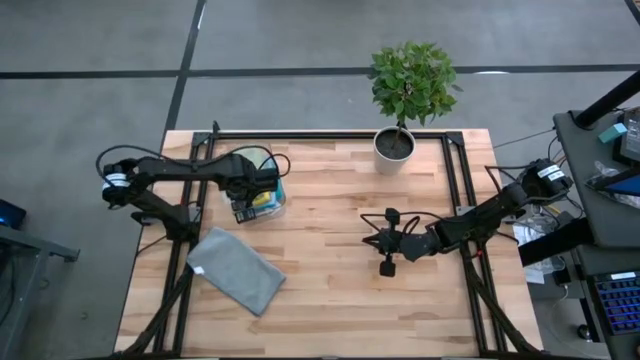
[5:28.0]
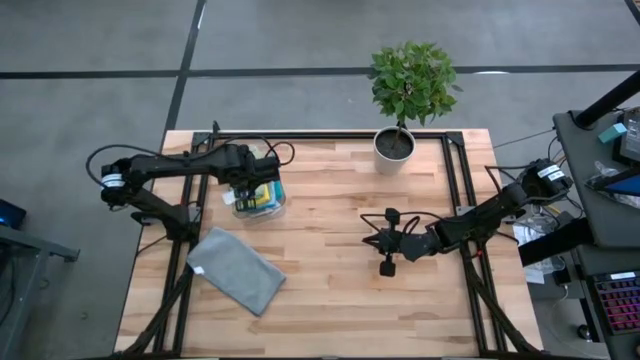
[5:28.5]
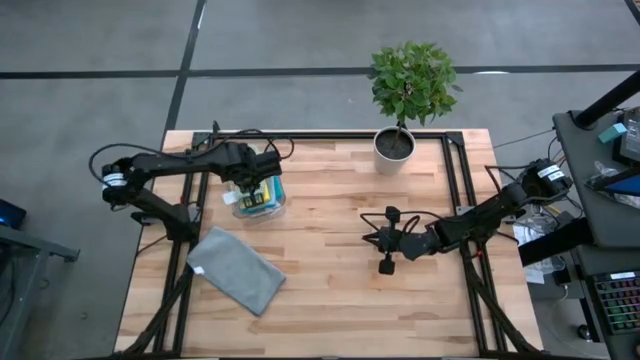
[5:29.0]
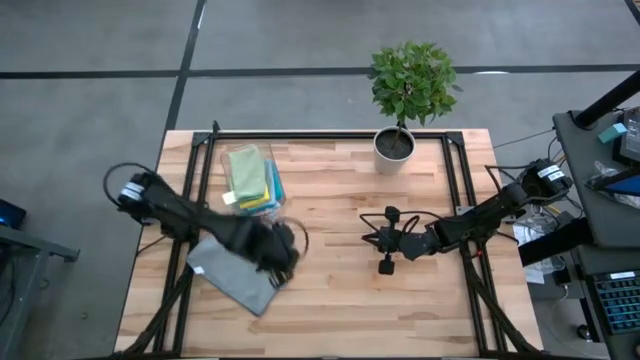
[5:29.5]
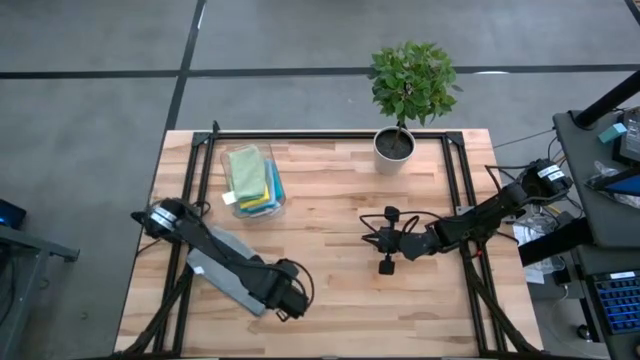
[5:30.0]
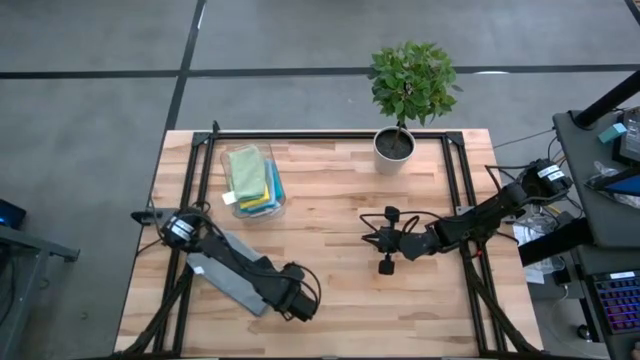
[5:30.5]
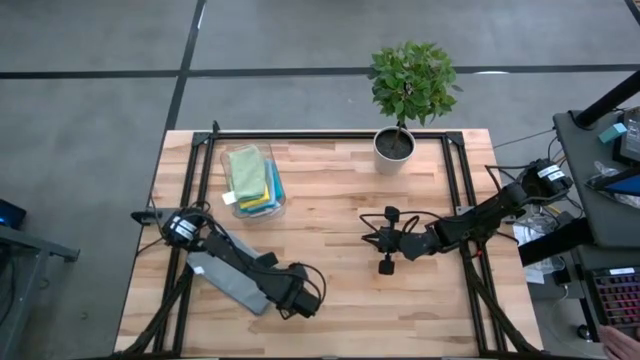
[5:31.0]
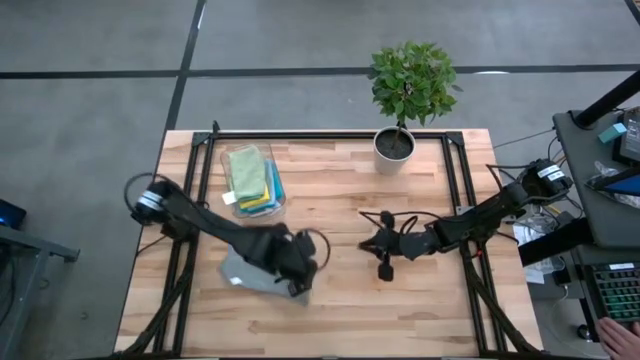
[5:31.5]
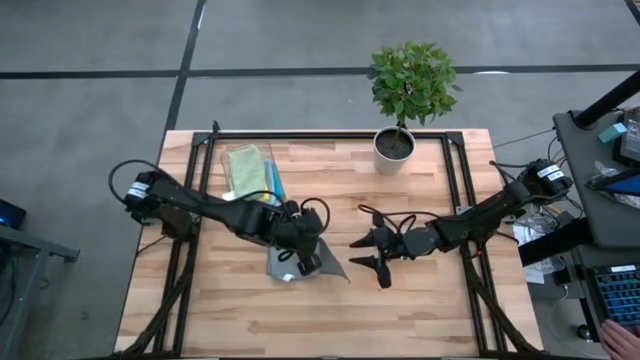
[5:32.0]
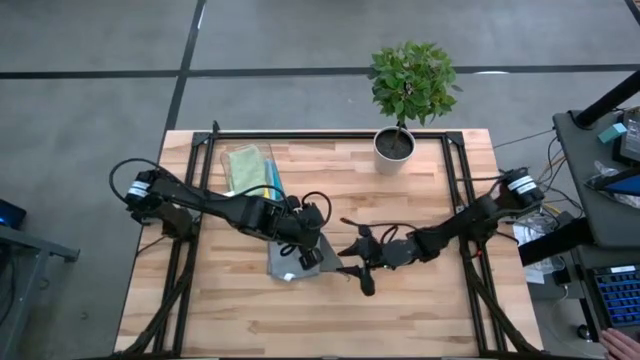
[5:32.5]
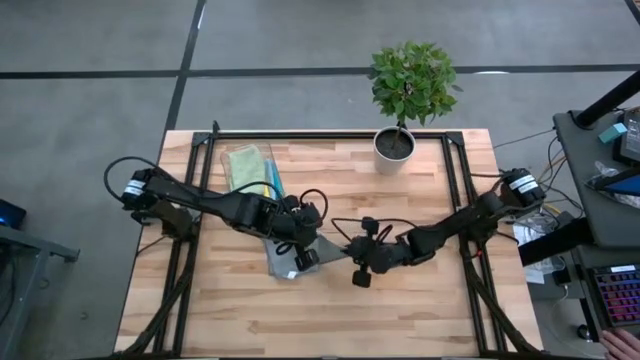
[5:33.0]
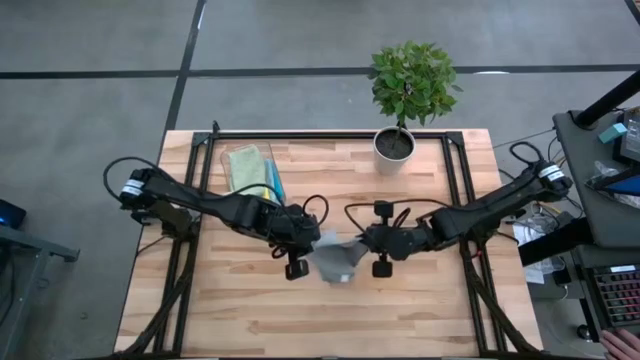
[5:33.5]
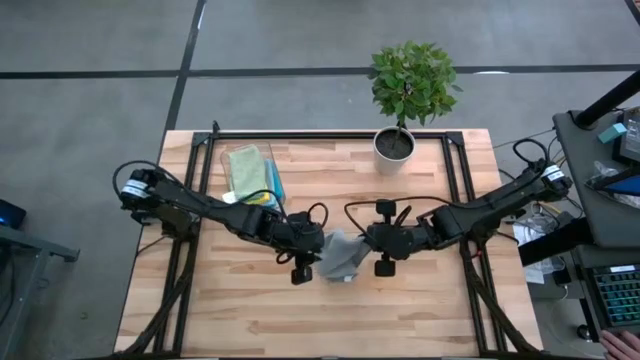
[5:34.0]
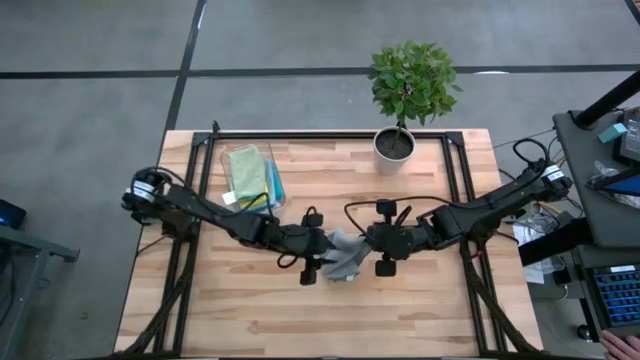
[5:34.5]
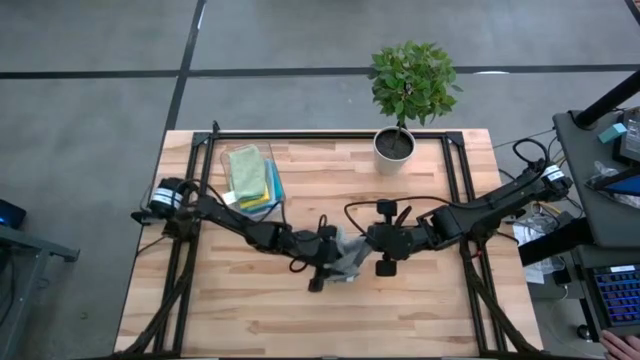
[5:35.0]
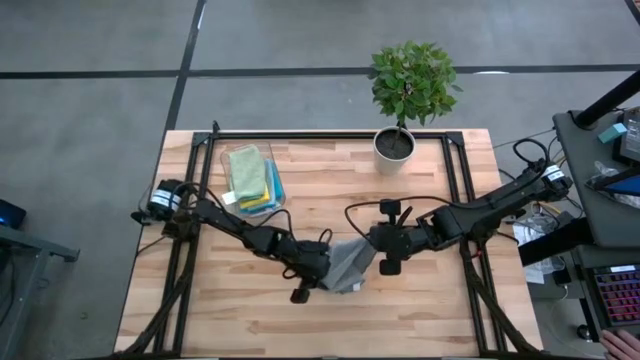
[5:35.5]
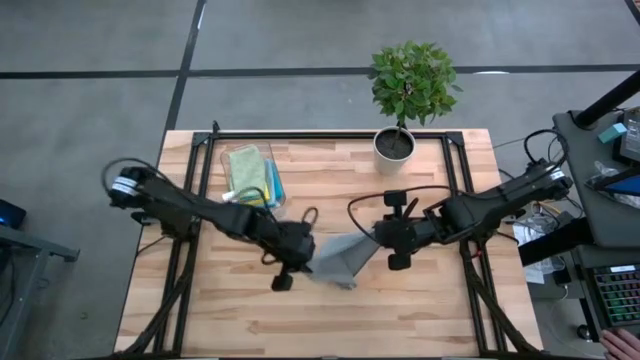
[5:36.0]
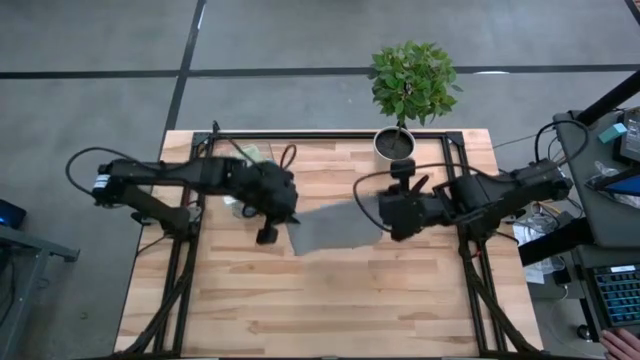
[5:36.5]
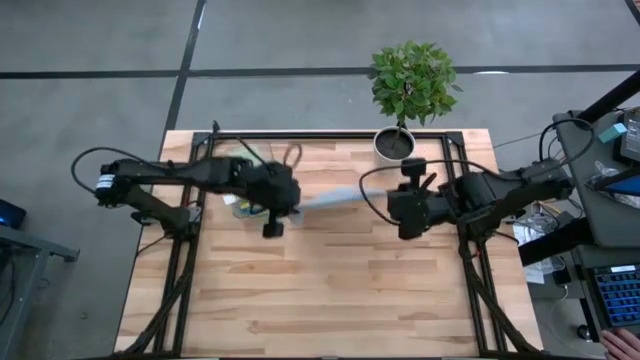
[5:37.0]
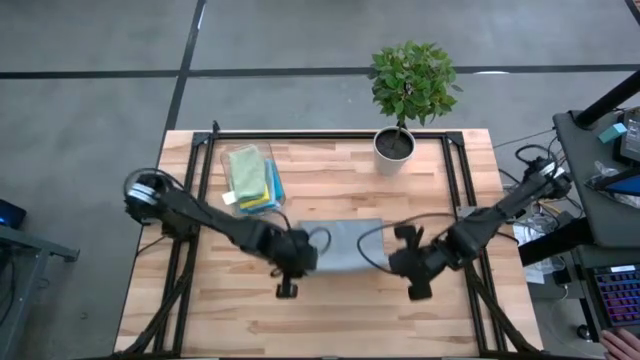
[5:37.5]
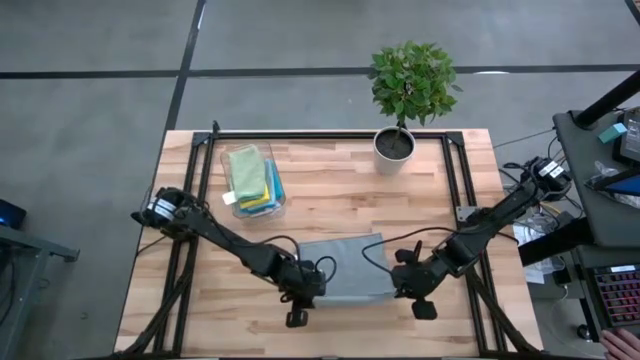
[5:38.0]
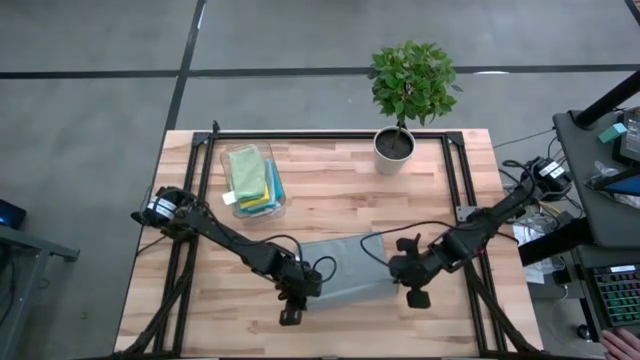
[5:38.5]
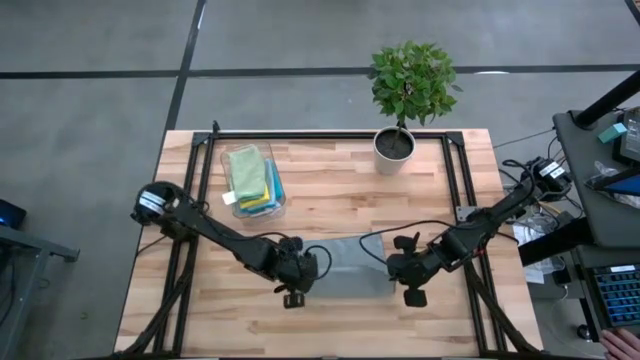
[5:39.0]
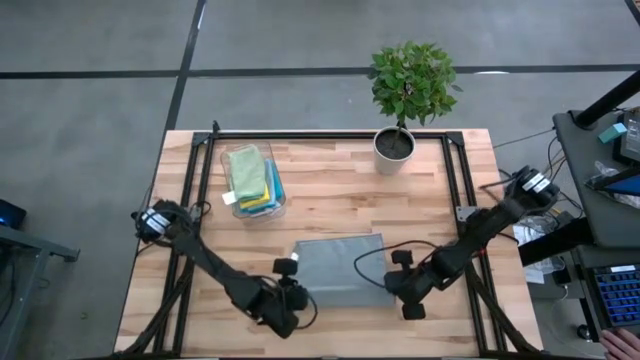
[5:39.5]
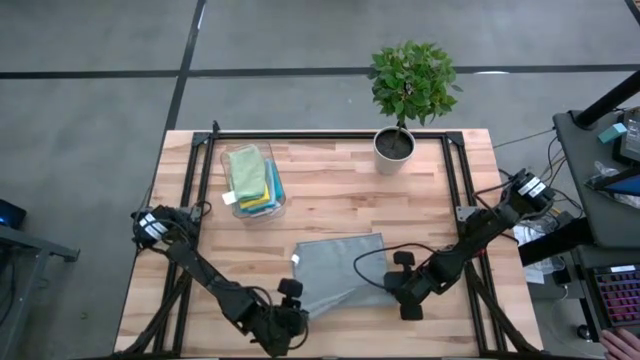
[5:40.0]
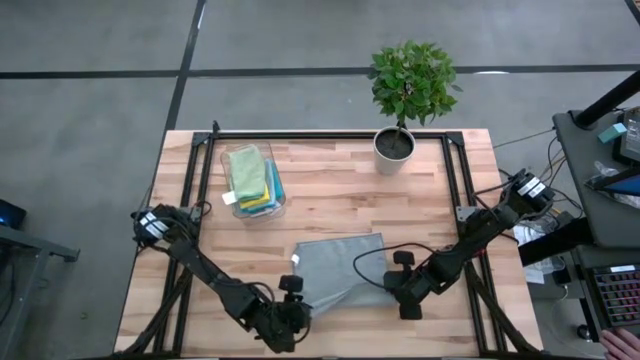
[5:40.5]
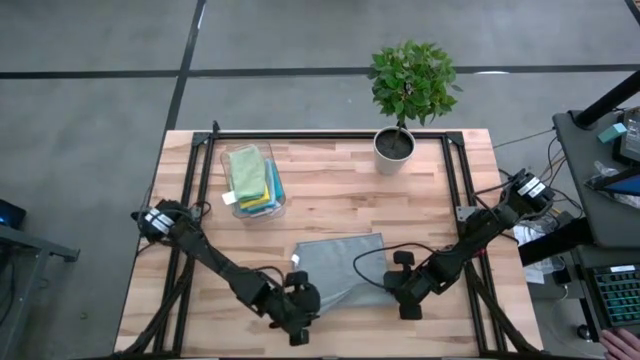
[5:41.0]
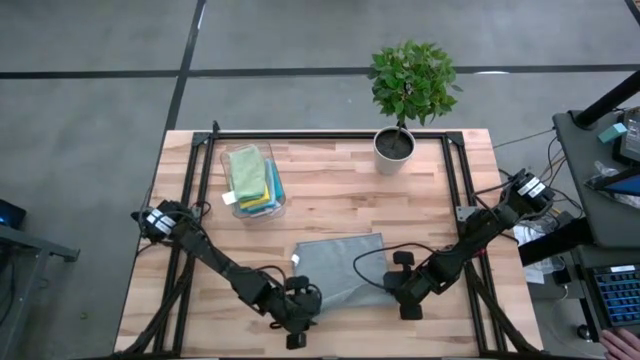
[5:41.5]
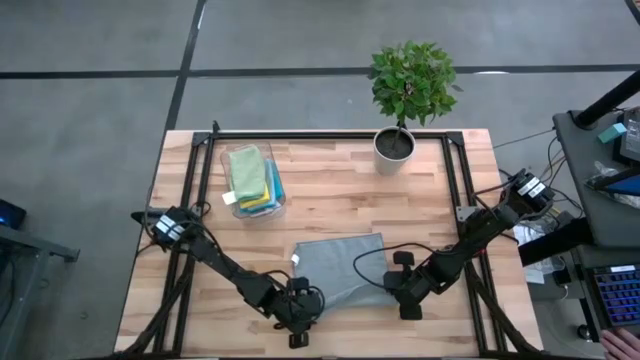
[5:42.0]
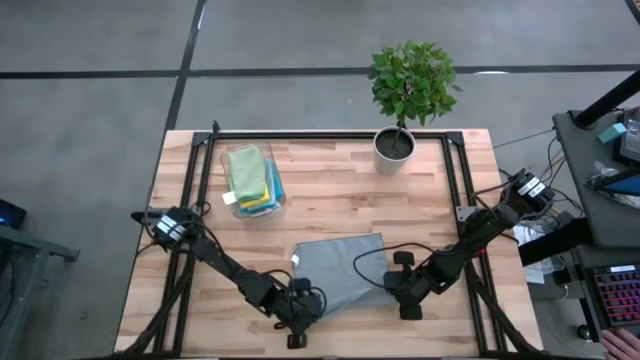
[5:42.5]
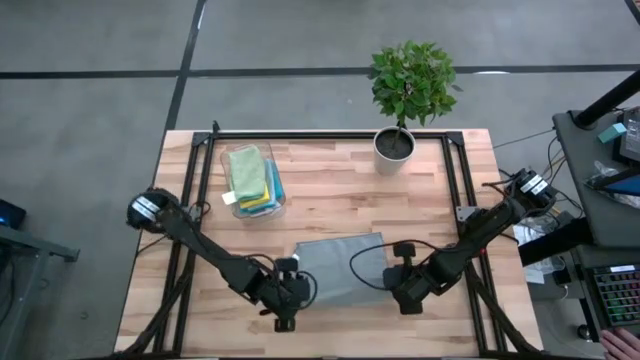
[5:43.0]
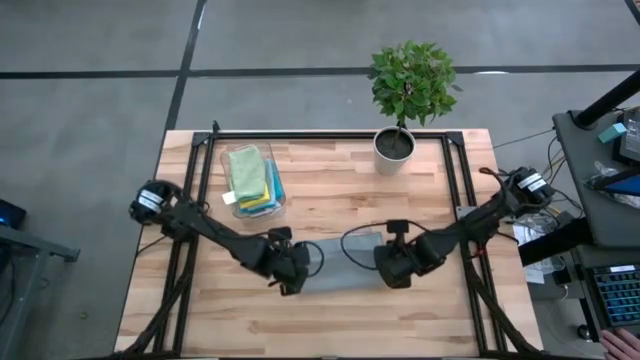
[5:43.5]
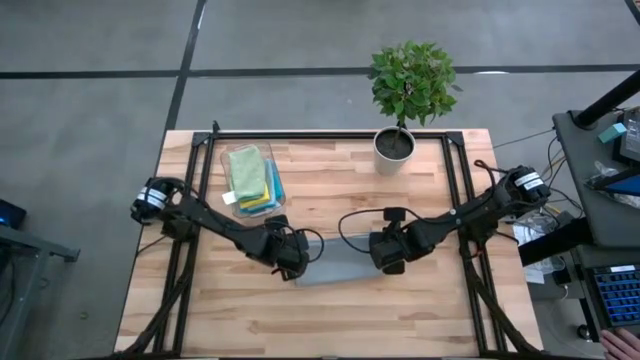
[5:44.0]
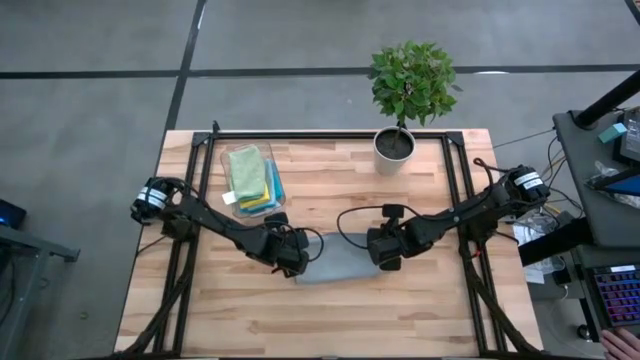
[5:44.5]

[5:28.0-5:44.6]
Task: Fold microfiber towels
Fold the gray microfiber cloth

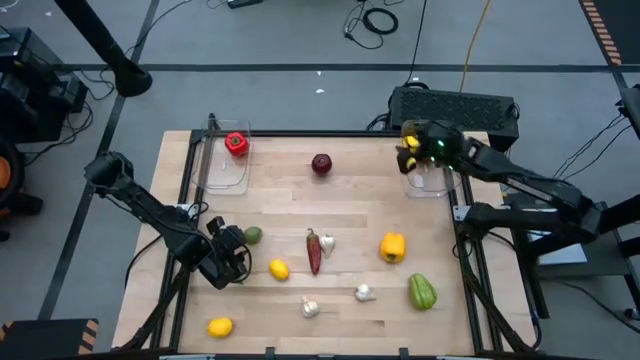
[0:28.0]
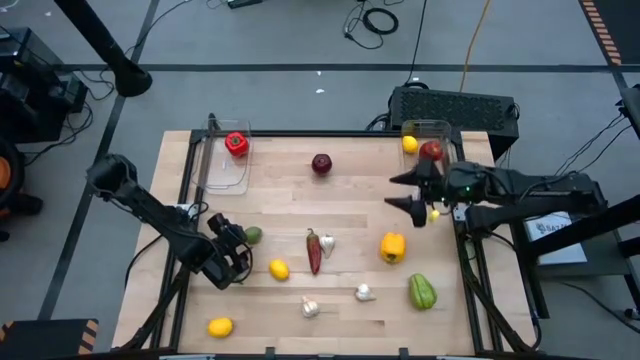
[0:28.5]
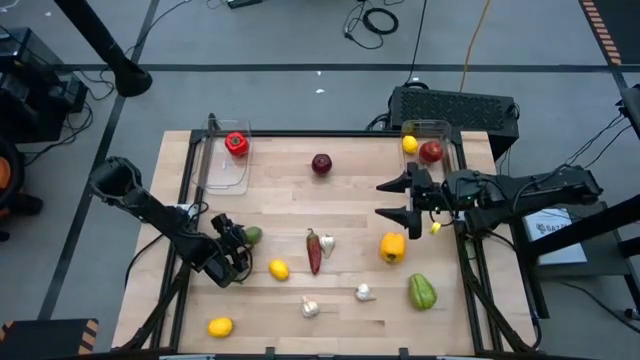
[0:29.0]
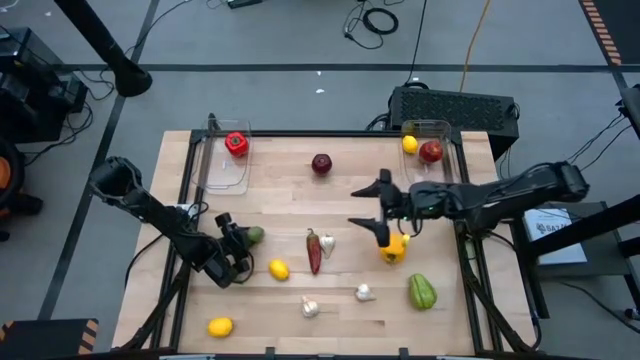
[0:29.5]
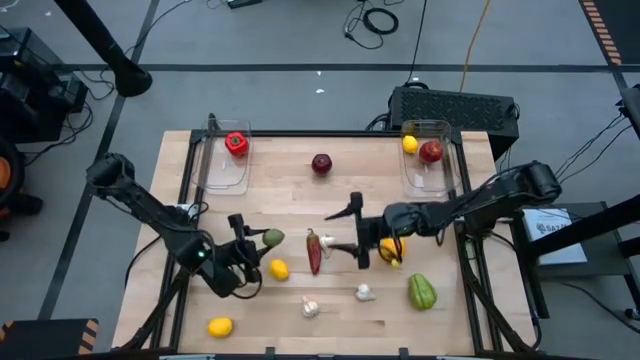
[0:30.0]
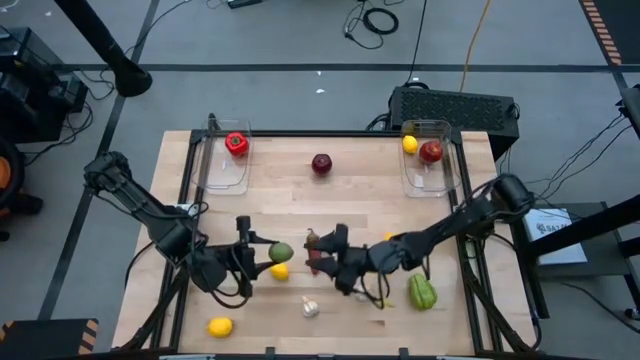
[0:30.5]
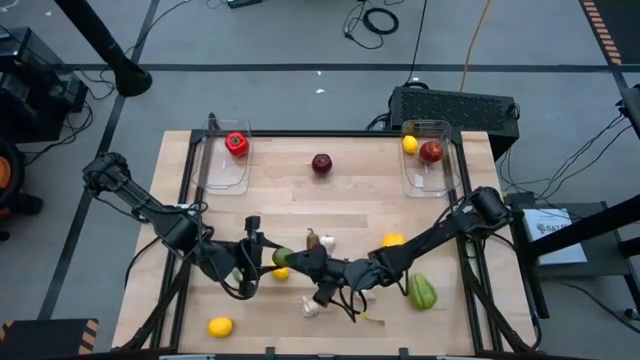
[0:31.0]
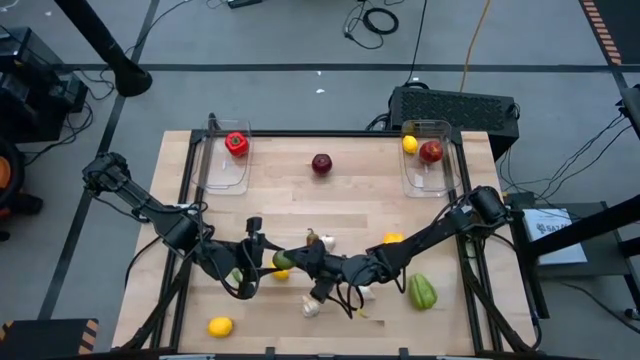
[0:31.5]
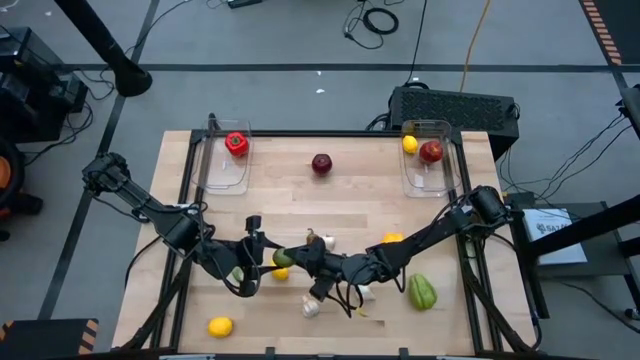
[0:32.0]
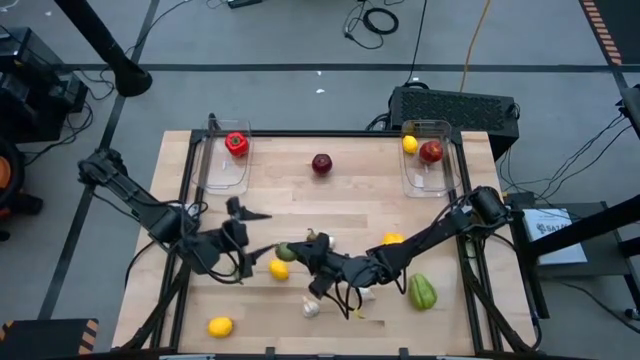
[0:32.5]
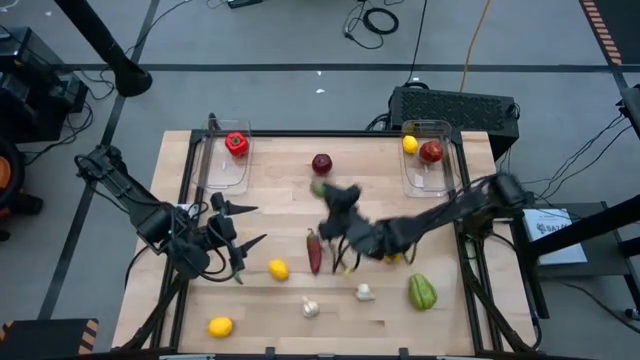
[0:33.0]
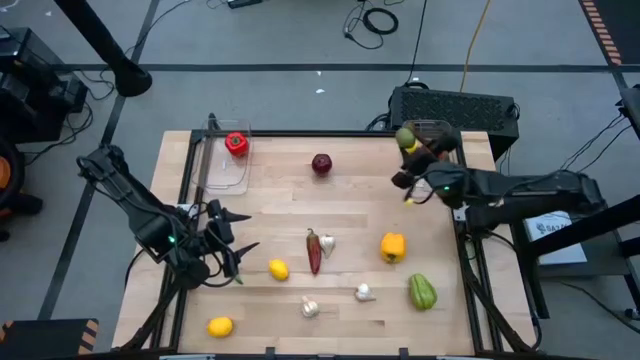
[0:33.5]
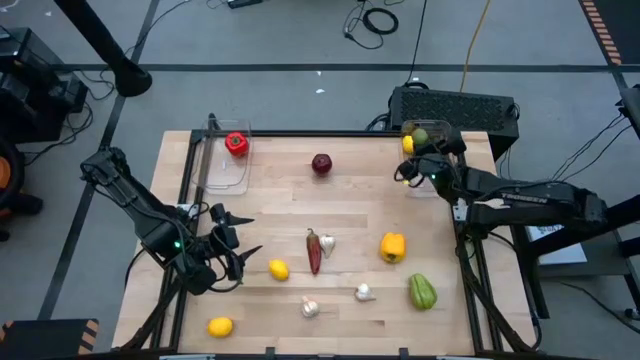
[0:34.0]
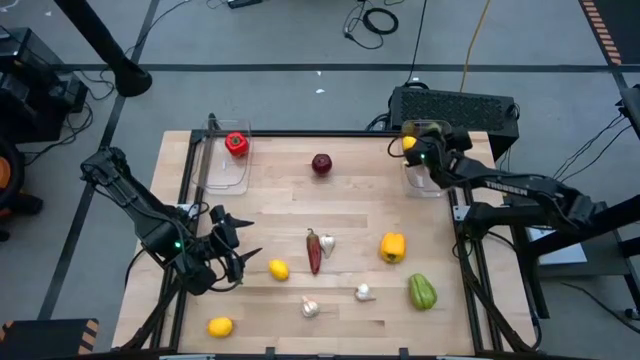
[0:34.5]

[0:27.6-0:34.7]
Task: Sort produce into baskets
Put the lime into the right transparent bin
